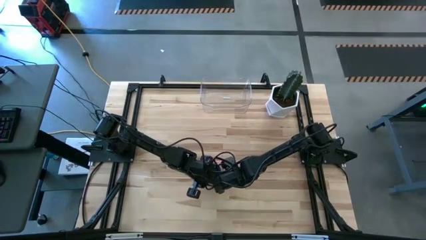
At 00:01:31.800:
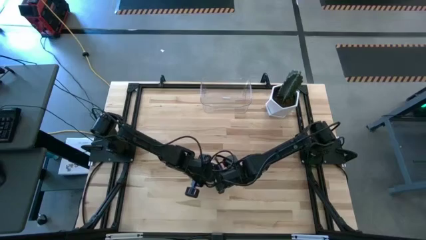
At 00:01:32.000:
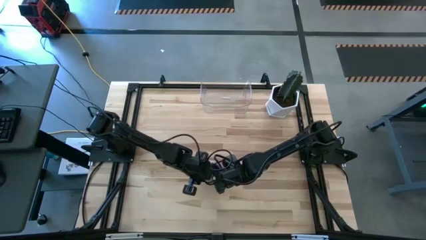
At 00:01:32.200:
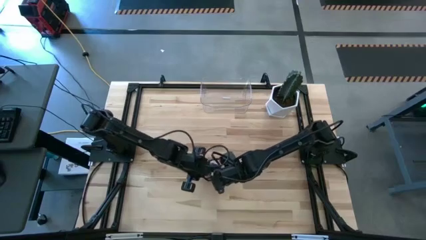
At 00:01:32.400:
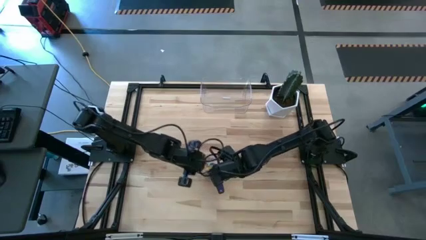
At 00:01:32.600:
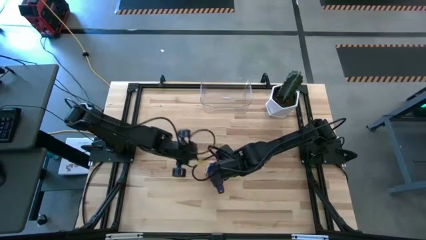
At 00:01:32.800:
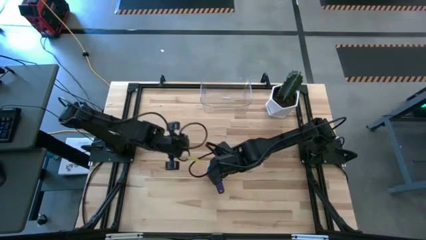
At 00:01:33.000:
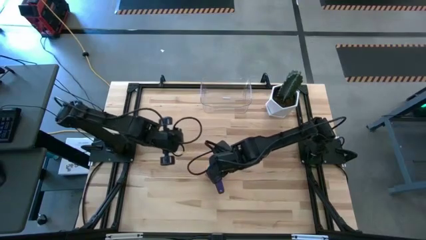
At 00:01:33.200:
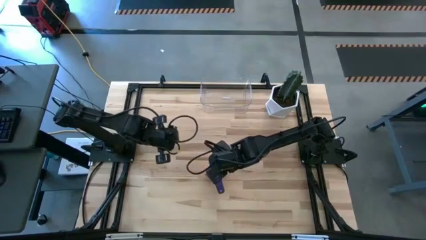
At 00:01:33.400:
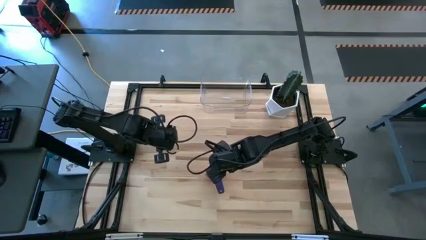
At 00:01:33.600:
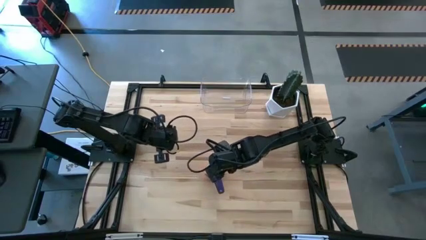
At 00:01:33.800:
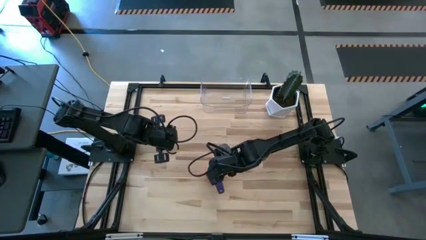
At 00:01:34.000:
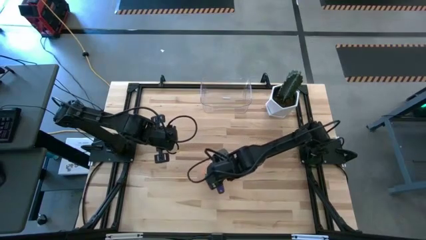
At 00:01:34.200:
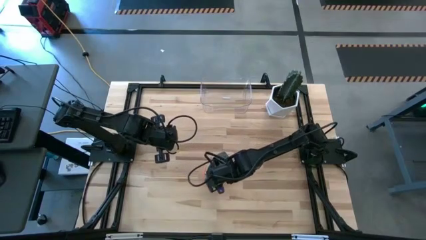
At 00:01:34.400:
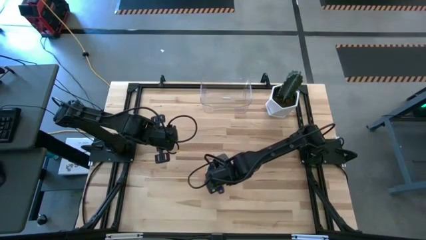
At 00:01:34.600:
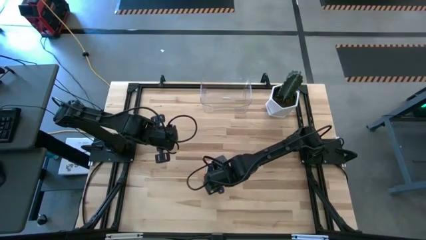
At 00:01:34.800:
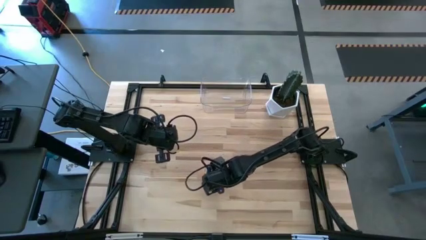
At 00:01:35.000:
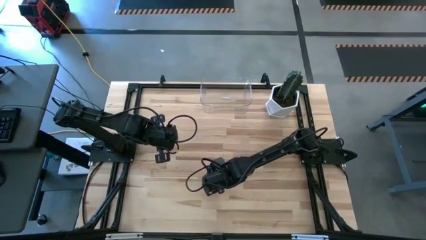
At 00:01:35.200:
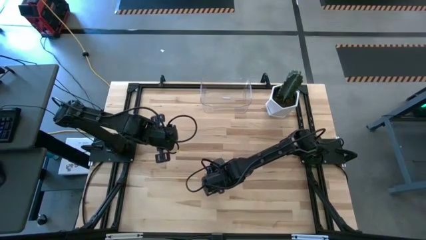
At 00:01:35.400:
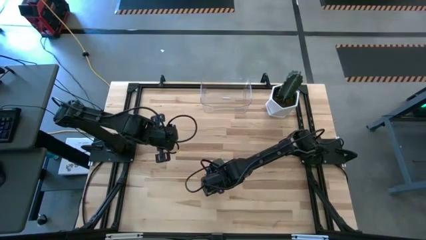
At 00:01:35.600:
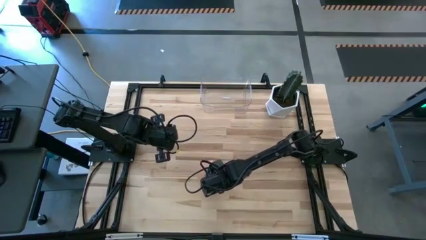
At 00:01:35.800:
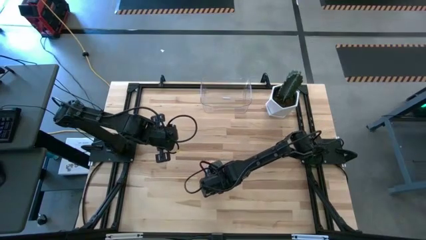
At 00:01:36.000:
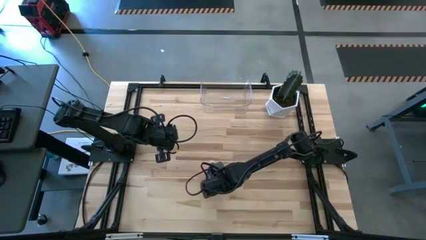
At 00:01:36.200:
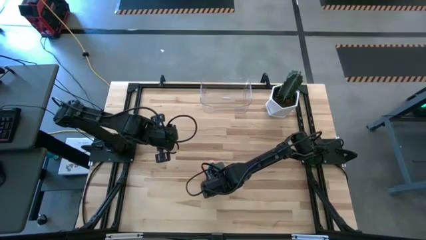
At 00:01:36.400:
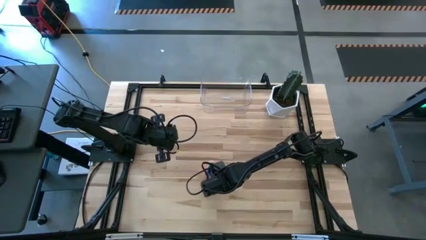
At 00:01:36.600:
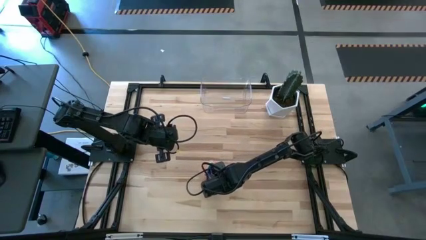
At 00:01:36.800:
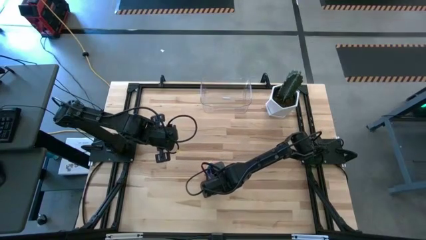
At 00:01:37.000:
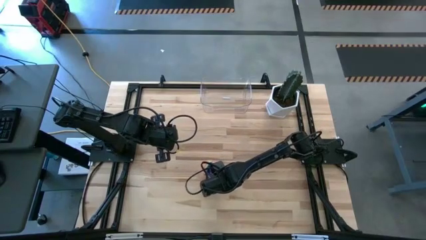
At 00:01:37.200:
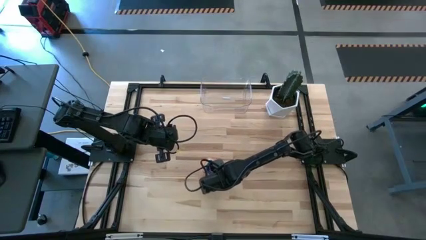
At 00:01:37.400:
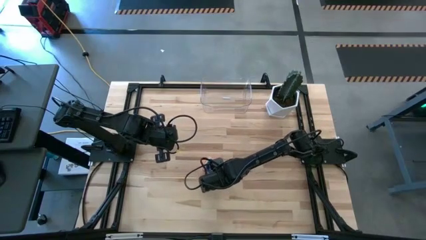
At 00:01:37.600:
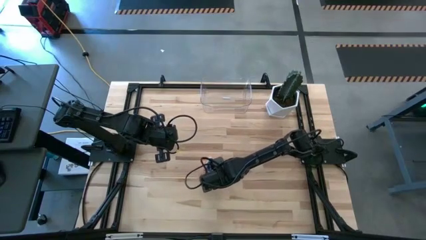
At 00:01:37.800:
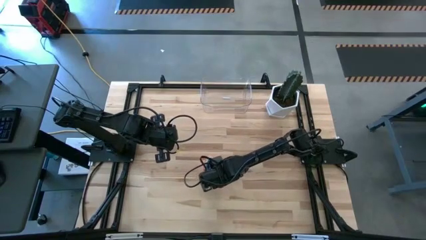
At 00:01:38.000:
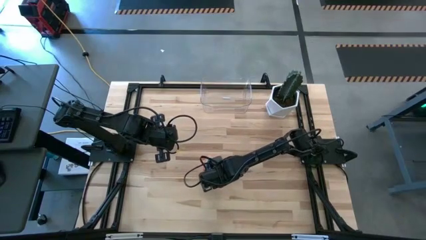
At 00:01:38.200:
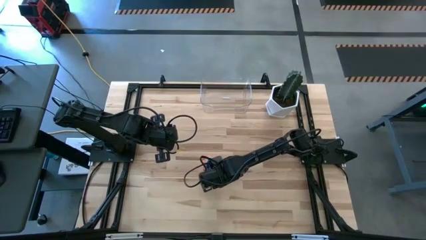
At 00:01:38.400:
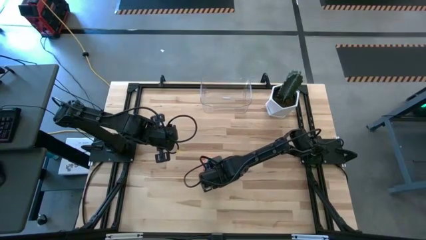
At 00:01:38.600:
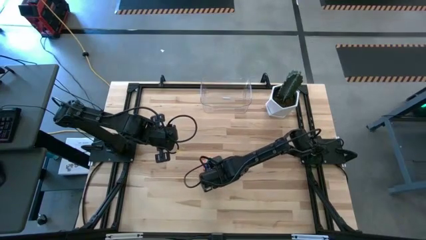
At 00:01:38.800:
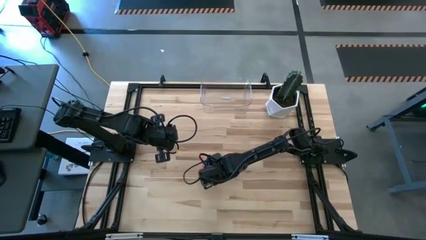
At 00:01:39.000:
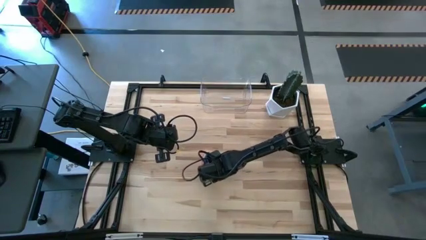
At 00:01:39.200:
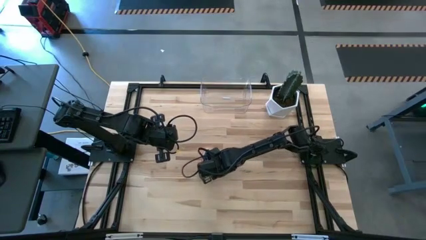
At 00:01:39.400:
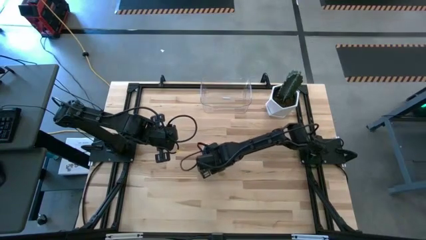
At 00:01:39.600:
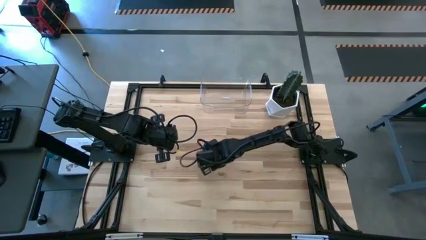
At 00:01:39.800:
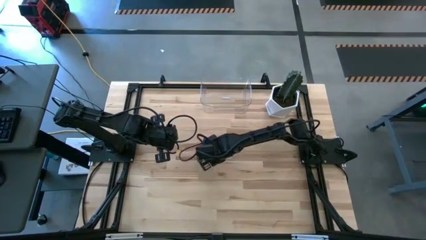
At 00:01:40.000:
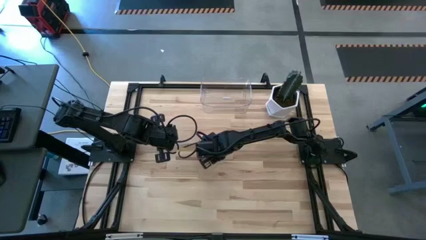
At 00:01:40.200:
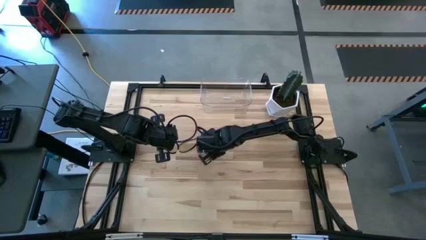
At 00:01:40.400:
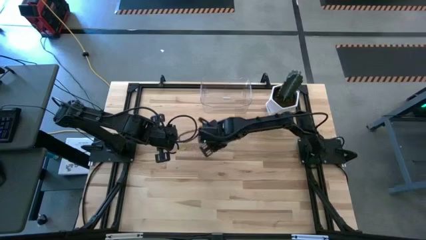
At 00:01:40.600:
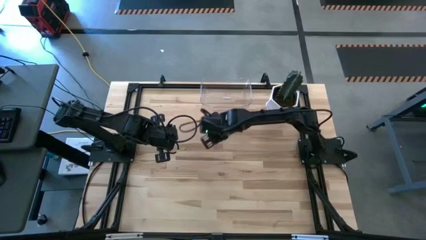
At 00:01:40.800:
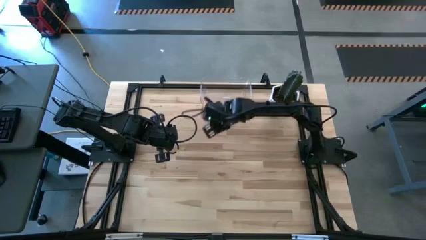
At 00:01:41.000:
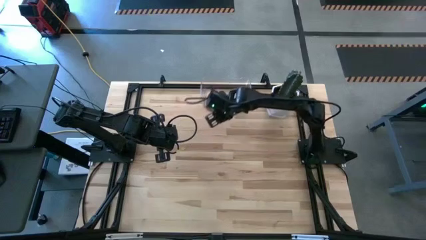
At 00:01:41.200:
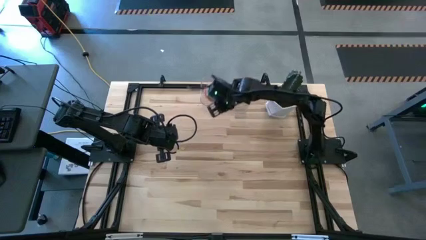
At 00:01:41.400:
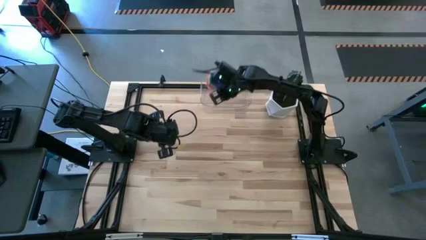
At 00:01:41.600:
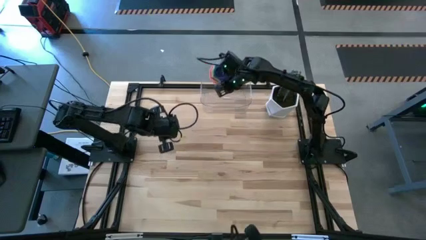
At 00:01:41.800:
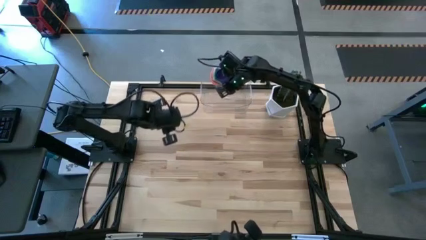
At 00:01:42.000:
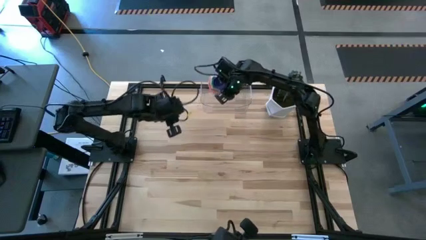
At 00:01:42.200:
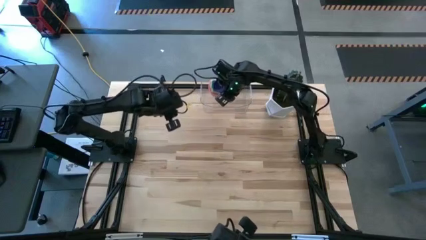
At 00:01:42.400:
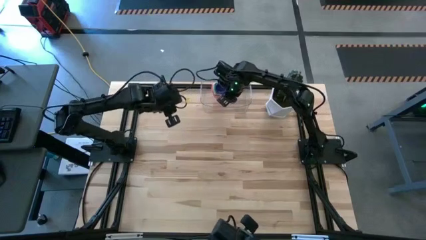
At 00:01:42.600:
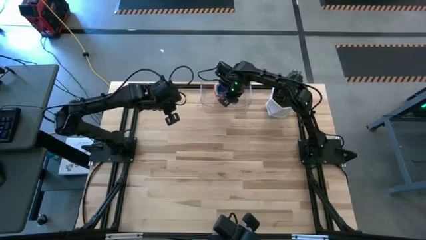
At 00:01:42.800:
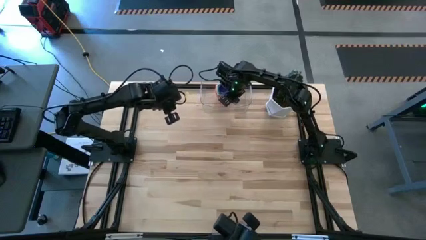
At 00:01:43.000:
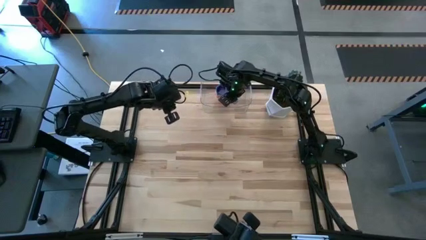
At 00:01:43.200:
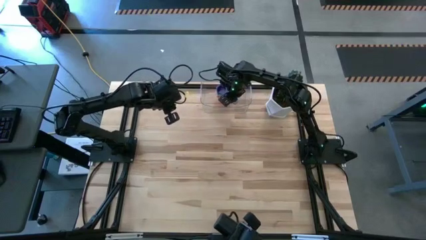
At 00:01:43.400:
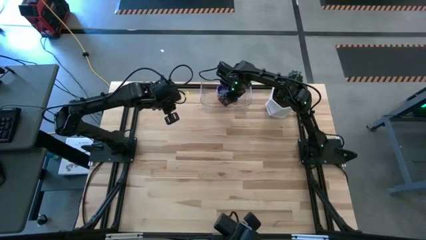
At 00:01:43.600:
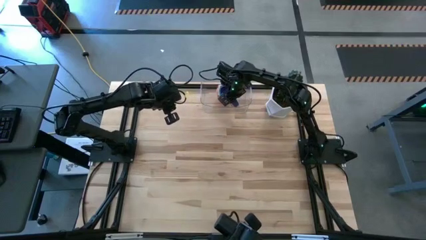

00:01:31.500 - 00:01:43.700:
Task: Nest measuring cups in basket
Put the stacked measuring cups into the transparent bin

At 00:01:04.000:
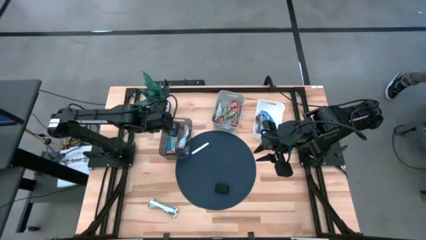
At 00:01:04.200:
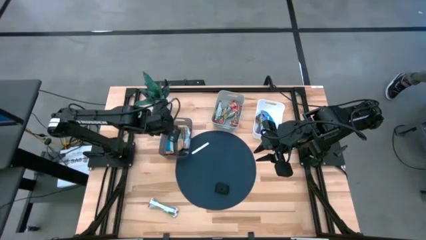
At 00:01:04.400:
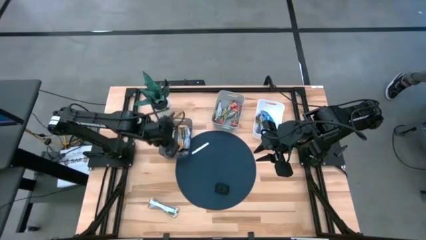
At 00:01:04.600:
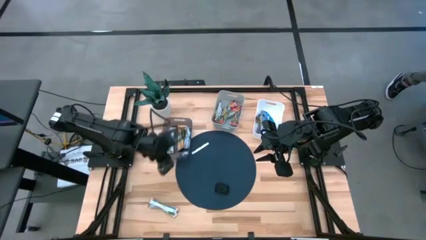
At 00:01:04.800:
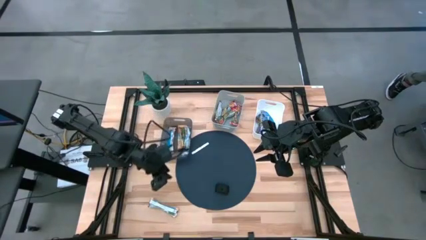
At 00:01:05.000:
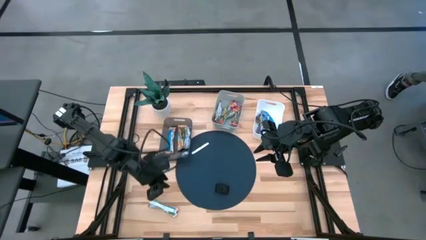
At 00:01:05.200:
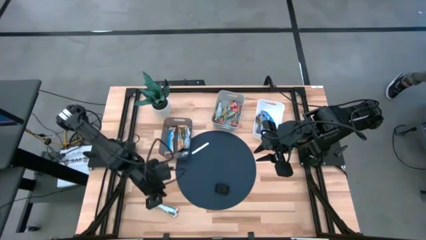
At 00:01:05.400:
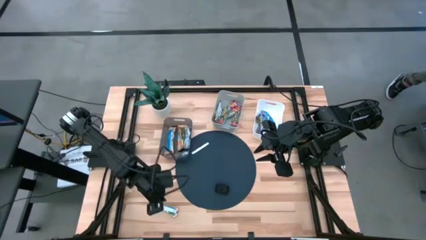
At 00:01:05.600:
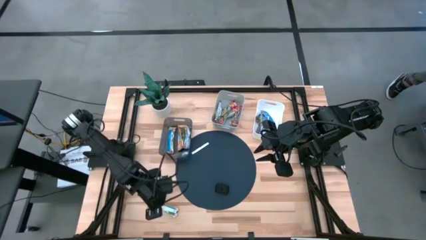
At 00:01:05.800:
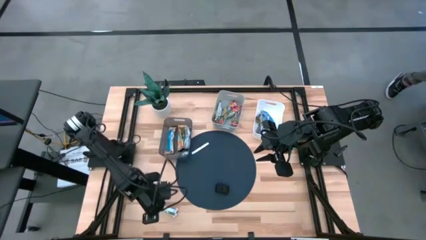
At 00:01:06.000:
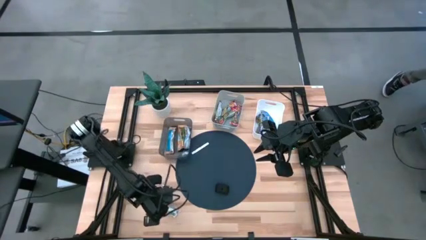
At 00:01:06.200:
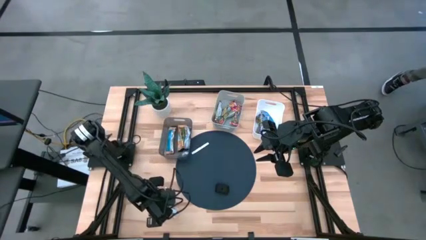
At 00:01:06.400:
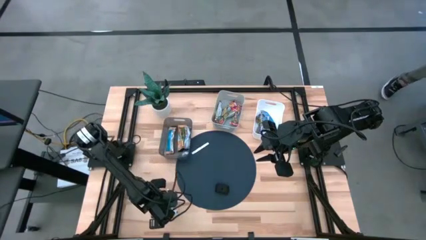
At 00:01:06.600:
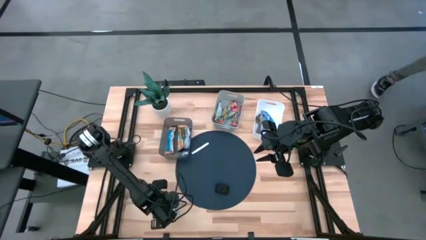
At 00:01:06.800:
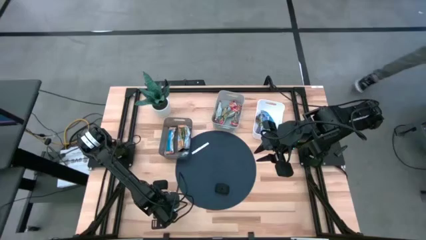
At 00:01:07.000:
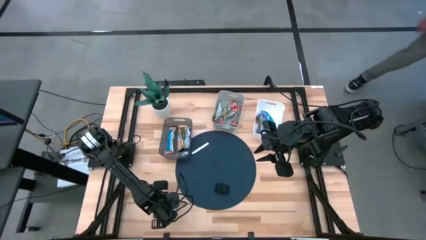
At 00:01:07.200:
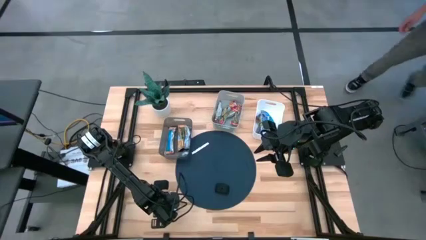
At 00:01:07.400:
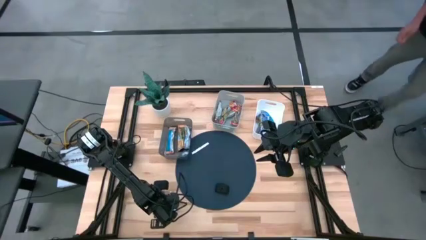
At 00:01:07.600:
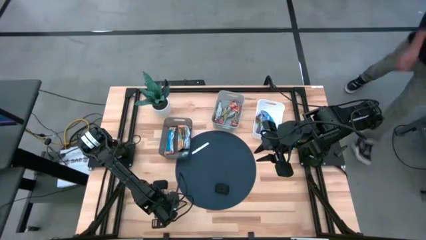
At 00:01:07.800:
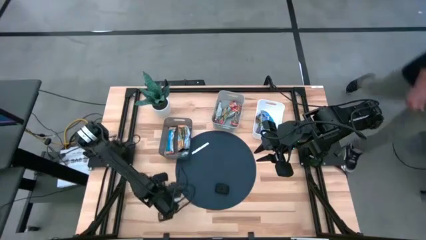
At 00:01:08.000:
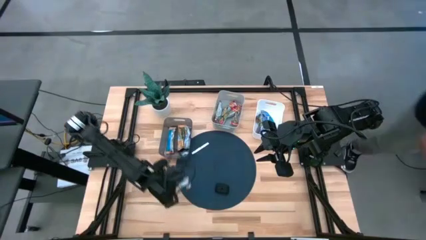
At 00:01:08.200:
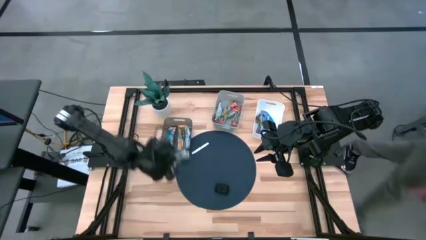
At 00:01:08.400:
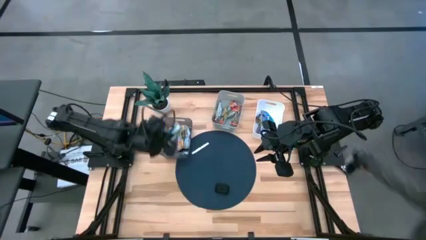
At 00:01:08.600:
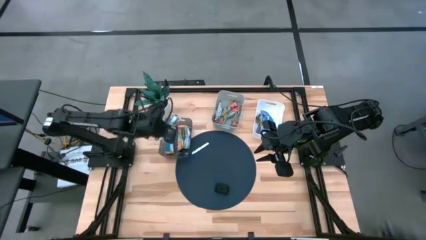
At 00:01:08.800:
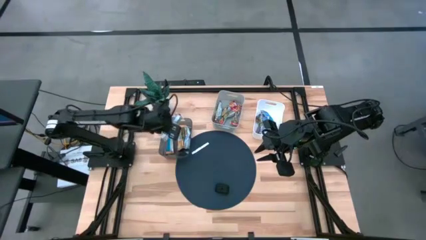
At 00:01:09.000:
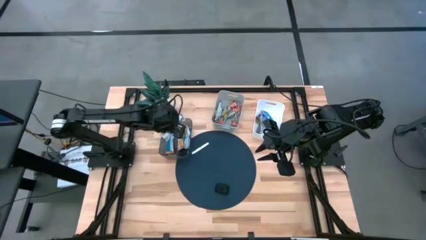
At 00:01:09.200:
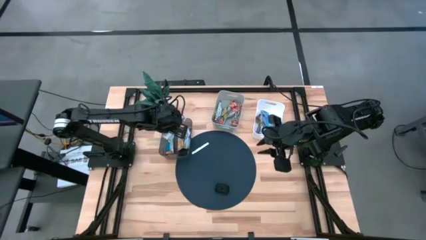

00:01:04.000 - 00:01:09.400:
Task: Pick and place Granola Bars by type
Put the orange granola bar into the black transparent bin
